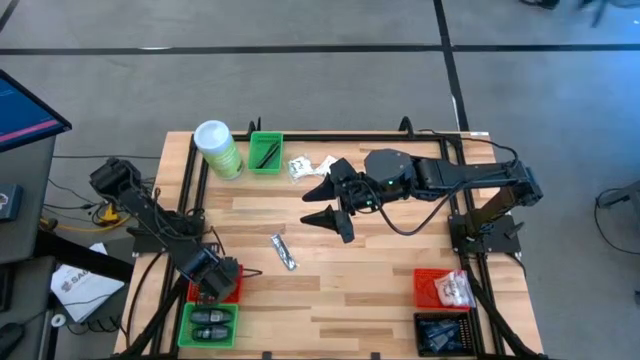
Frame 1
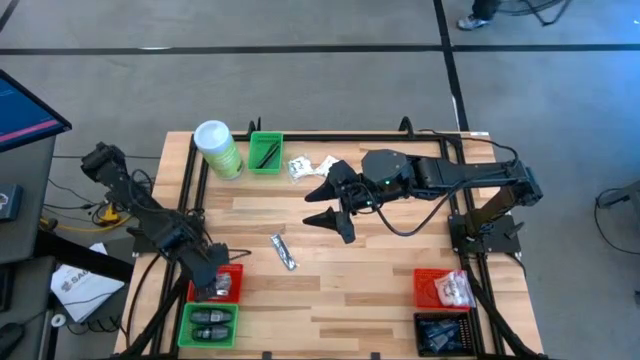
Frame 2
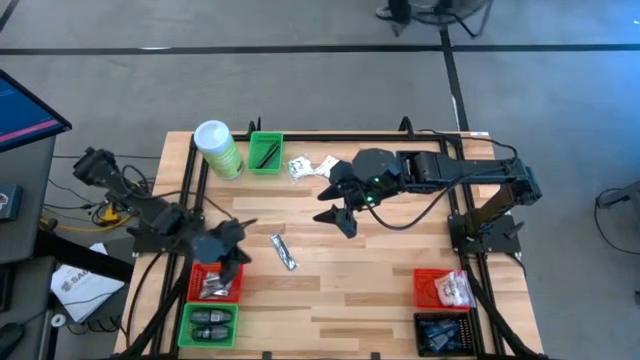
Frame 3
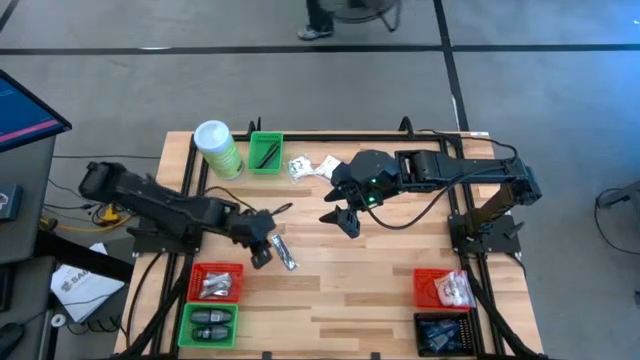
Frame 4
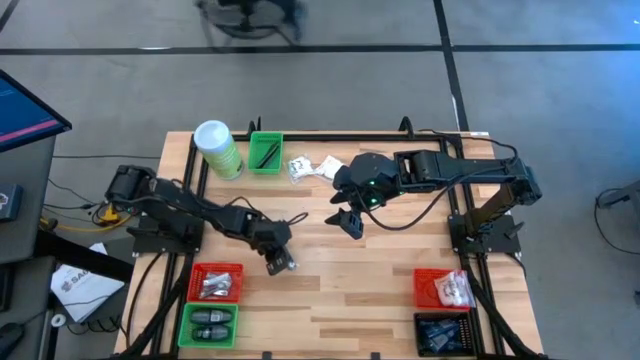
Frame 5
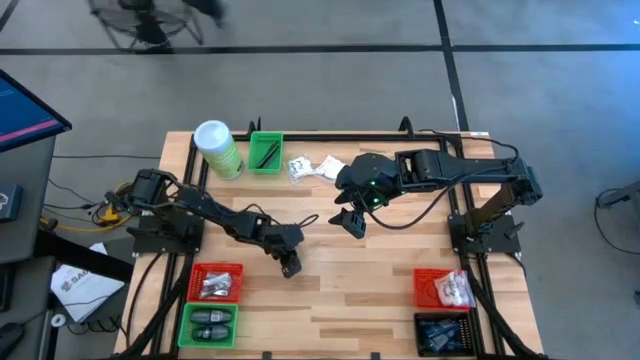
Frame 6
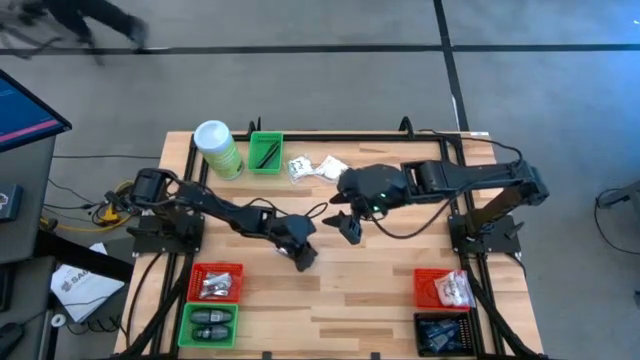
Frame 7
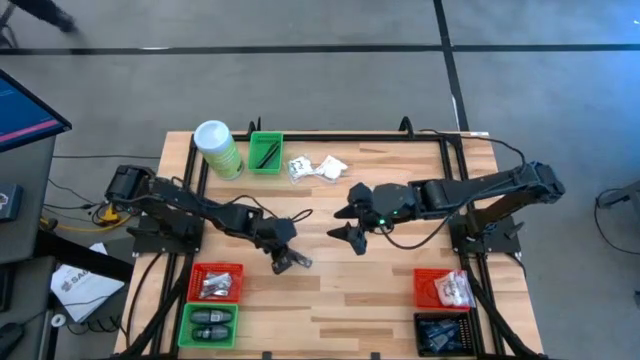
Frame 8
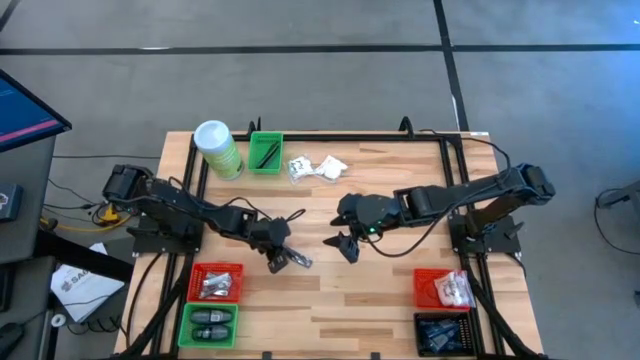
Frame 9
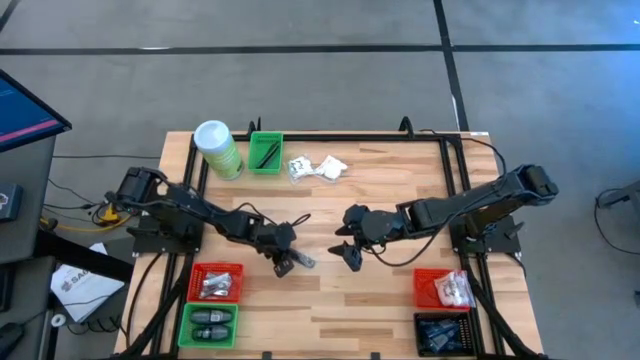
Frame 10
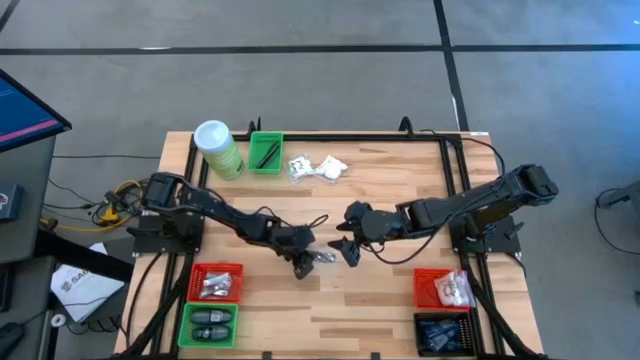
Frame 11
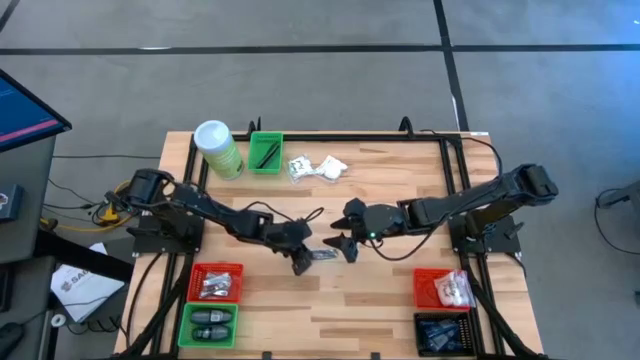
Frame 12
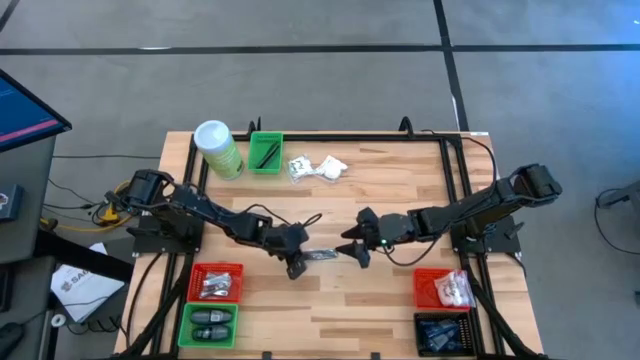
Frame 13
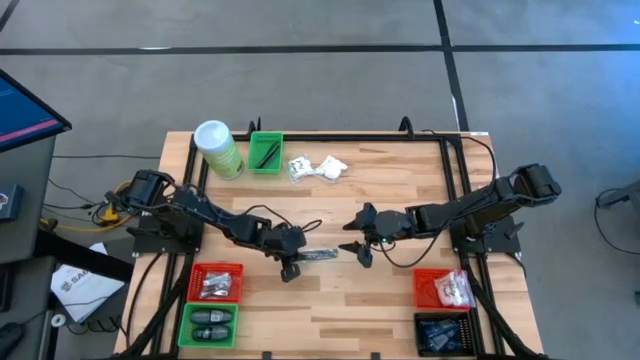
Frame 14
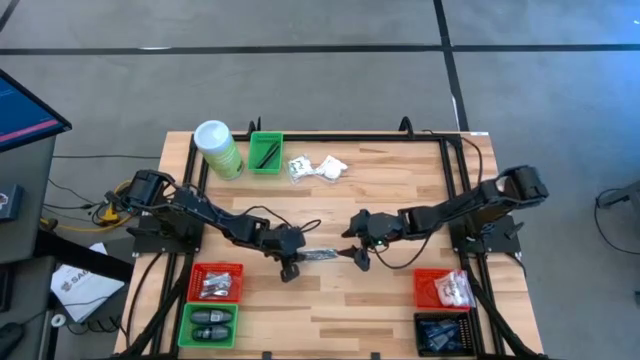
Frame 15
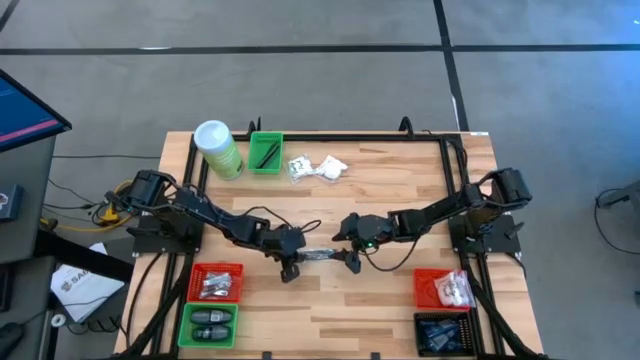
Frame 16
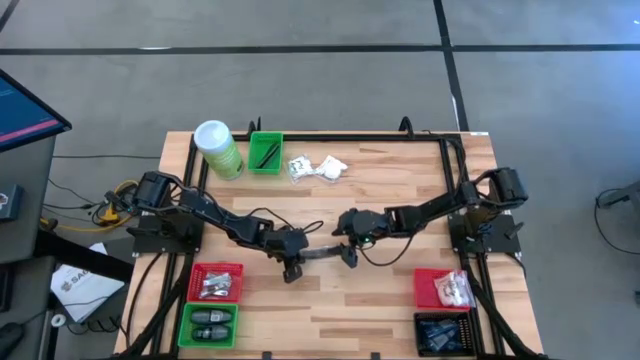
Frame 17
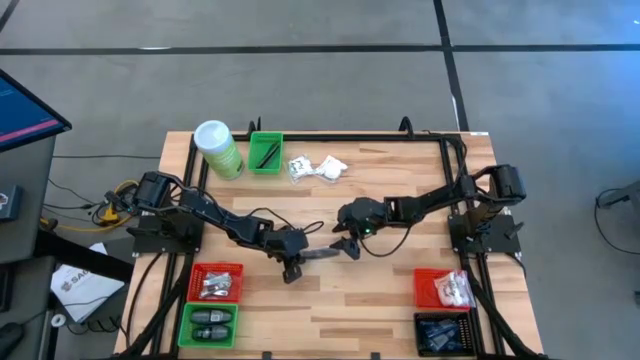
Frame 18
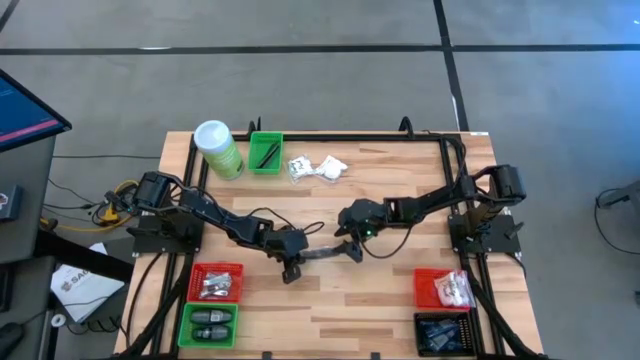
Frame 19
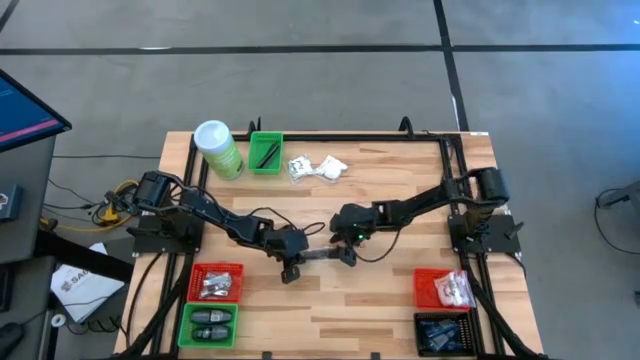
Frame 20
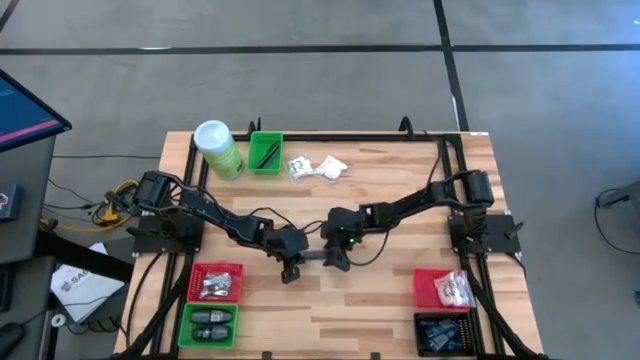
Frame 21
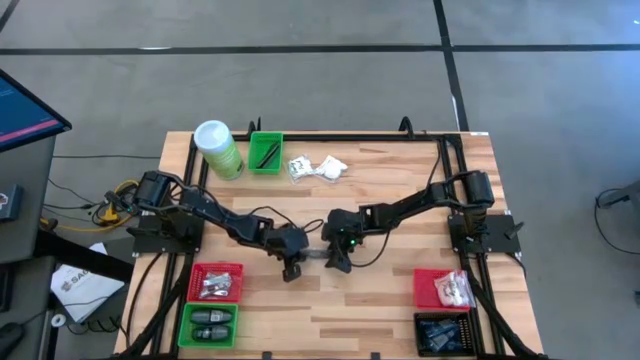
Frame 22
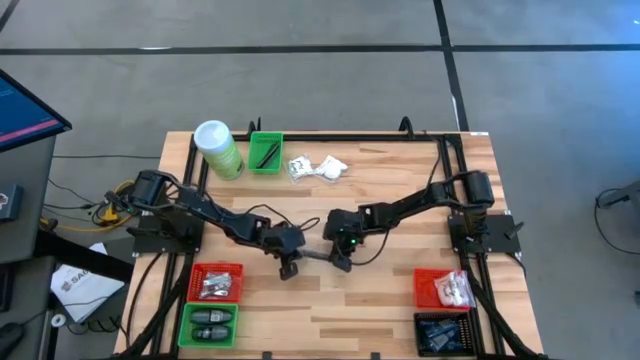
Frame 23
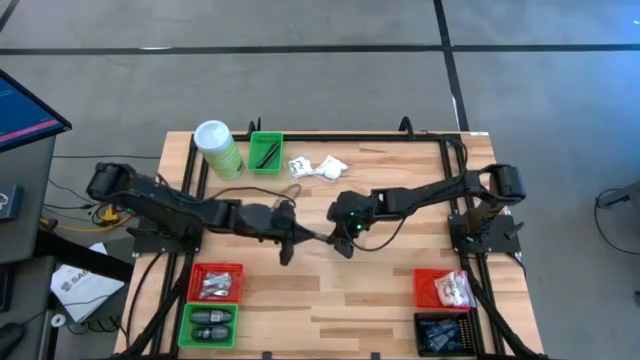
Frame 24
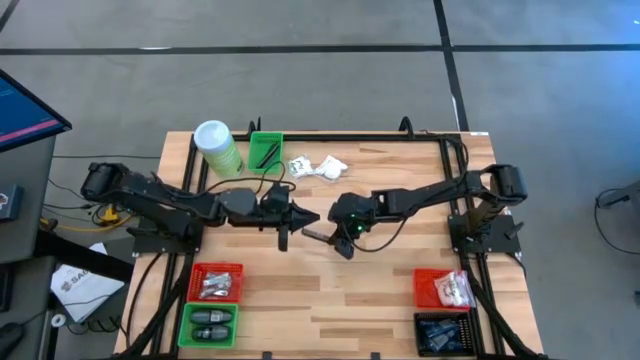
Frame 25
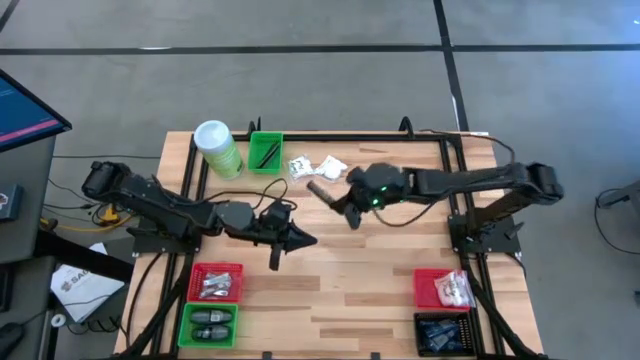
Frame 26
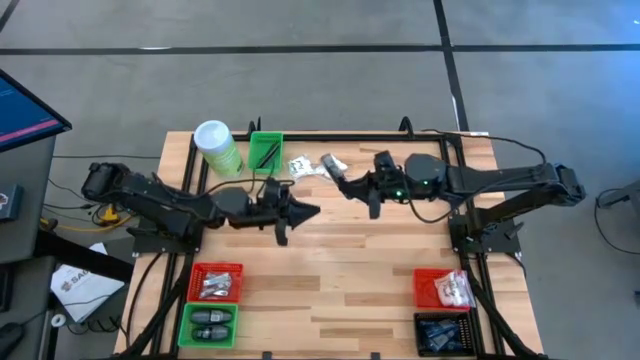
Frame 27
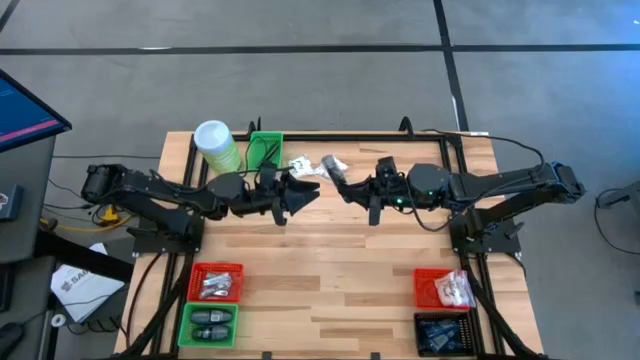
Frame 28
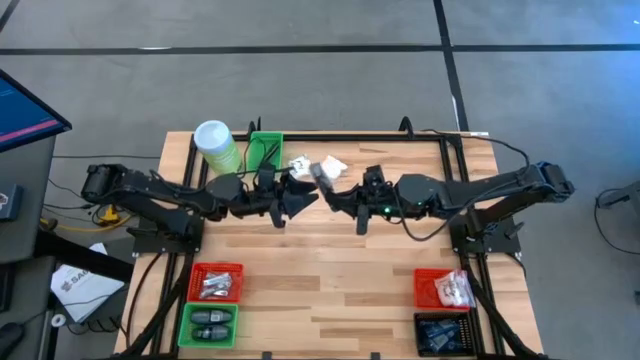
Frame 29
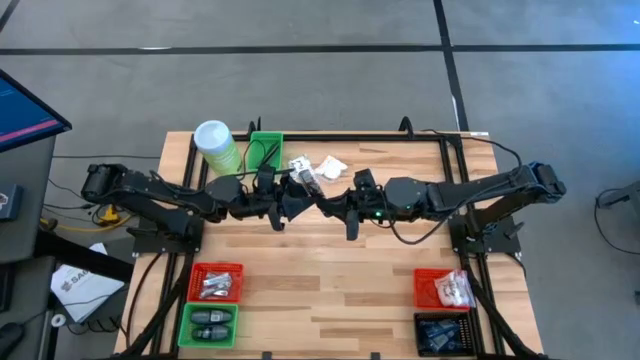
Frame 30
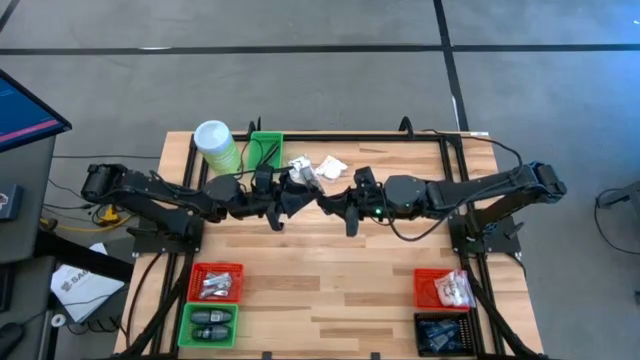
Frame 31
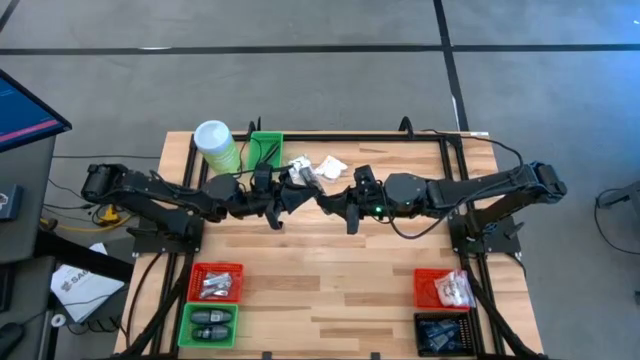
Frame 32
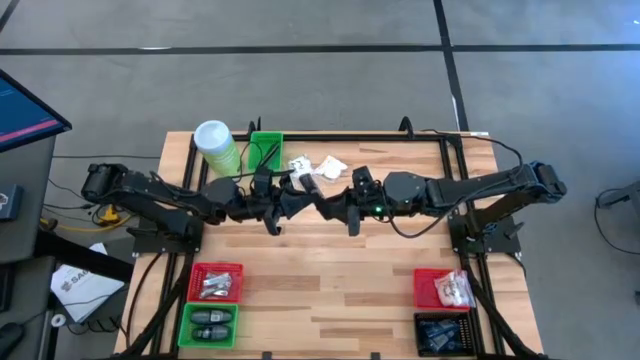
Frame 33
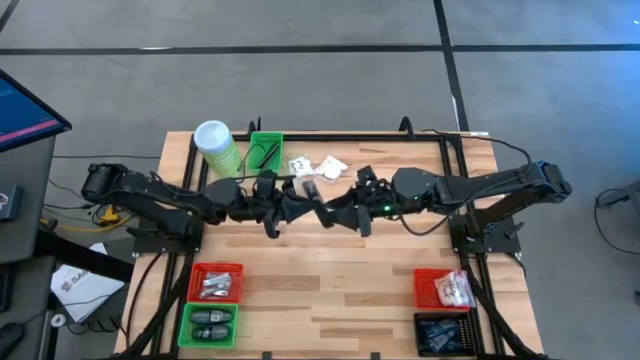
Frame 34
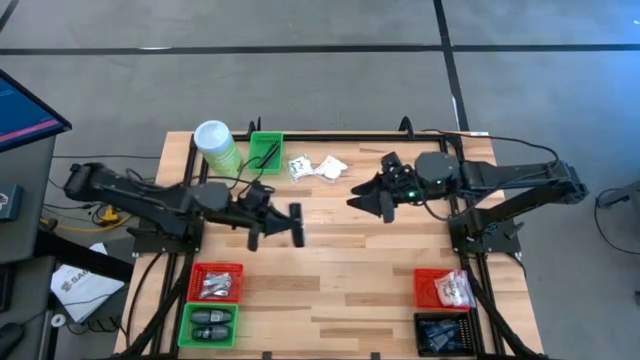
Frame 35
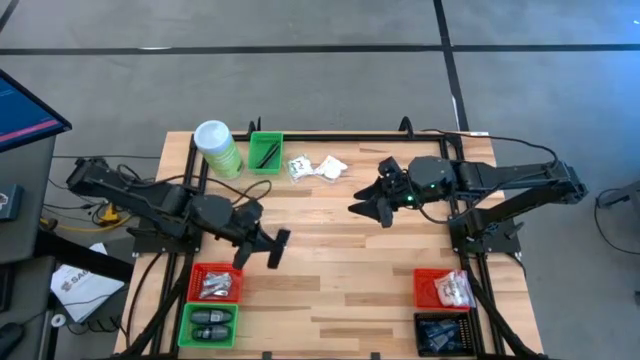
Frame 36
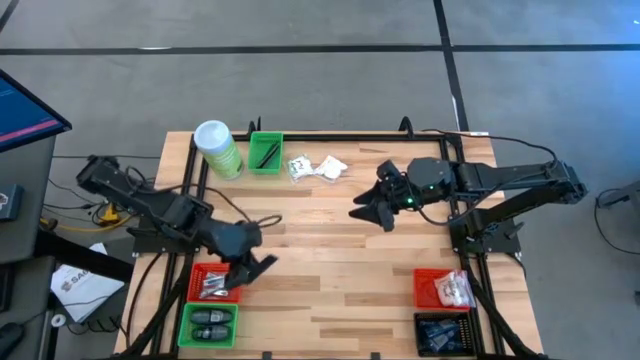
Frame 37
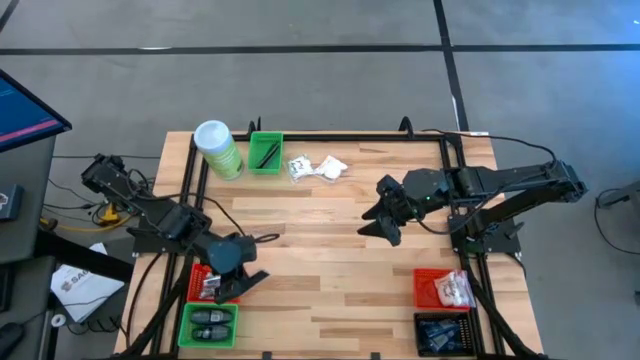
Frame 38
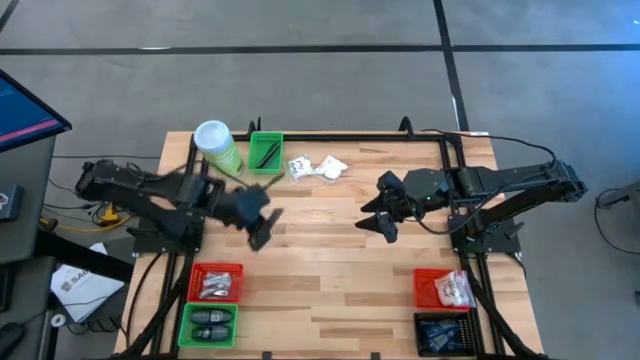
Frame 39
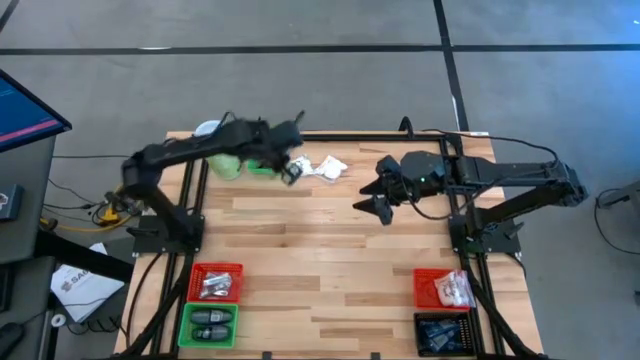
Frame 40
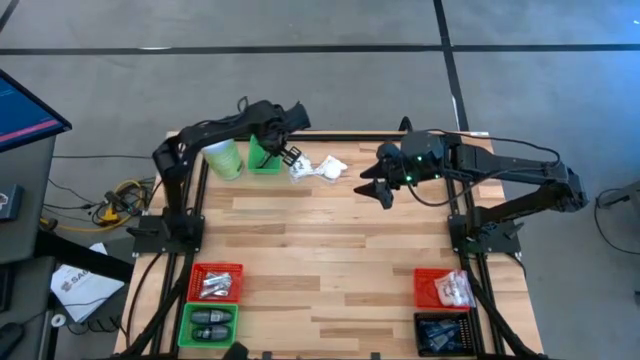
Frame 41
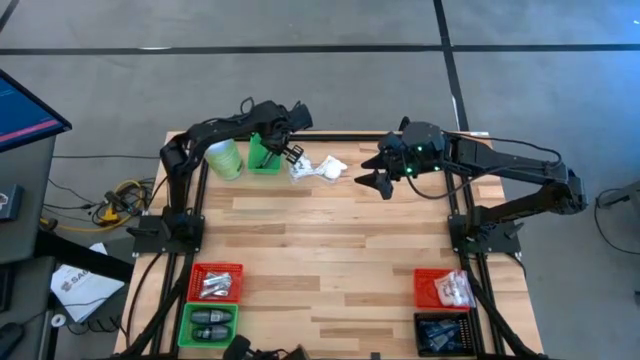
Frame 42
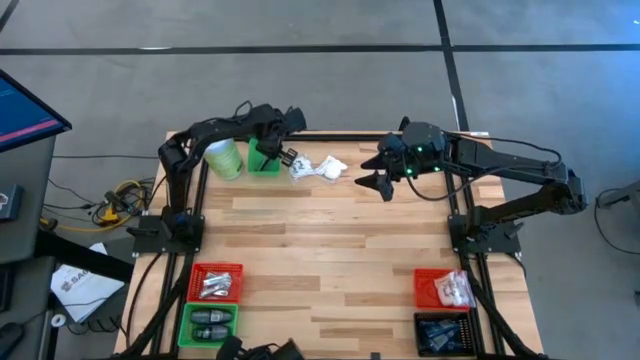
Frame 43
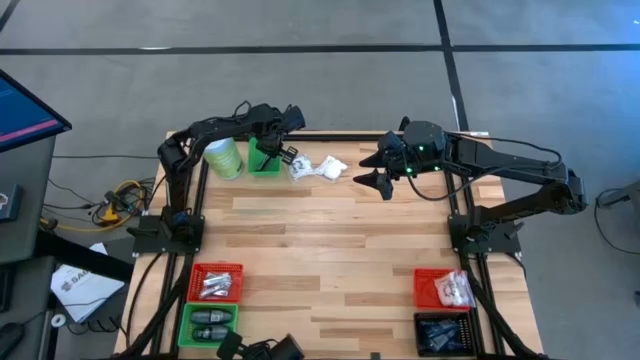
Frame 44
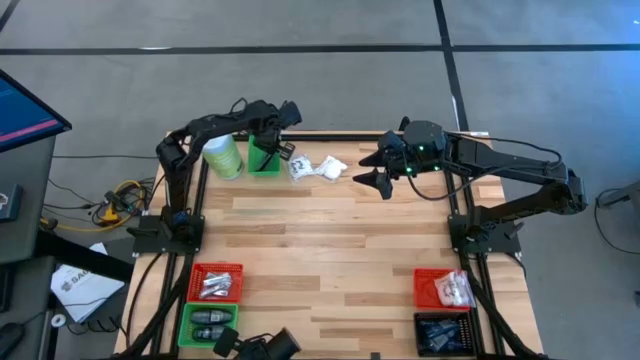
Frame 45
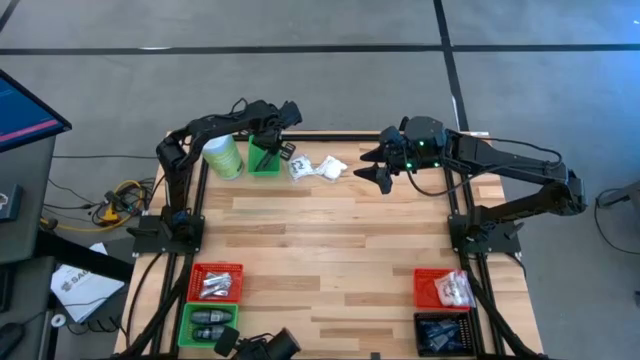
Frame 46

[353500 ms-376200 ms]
Task: Pick & Place Travel size toiletries
Put the black comb into the top green bin
